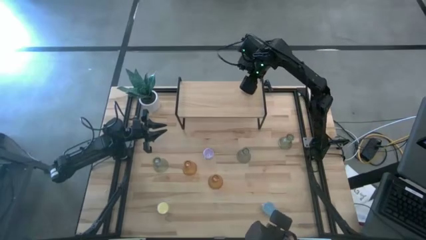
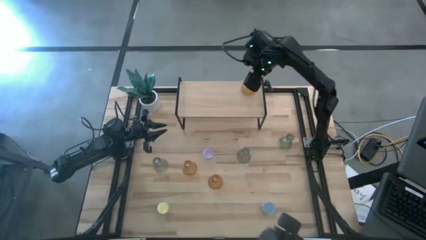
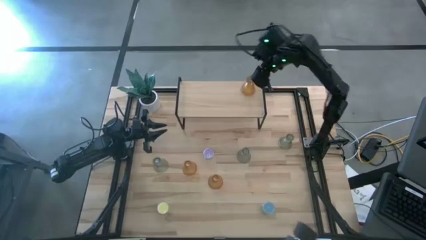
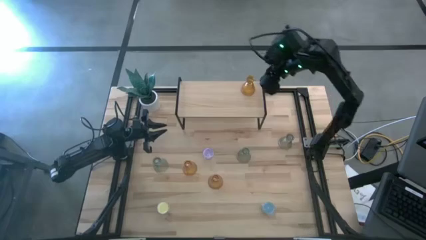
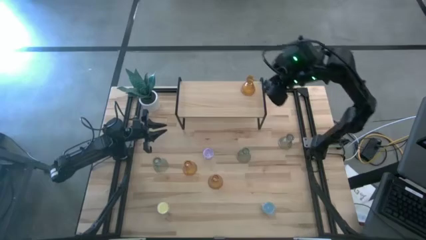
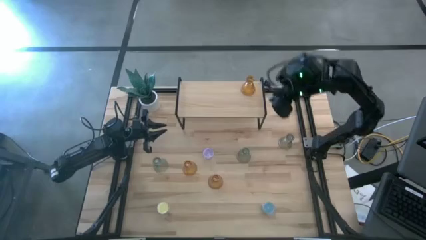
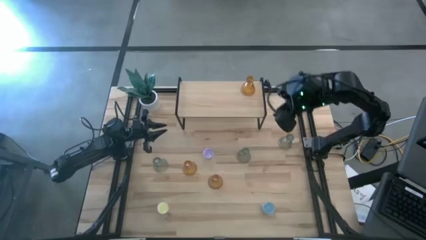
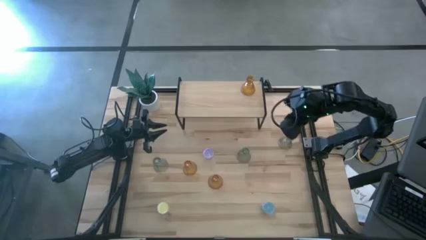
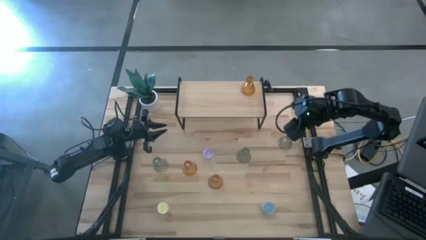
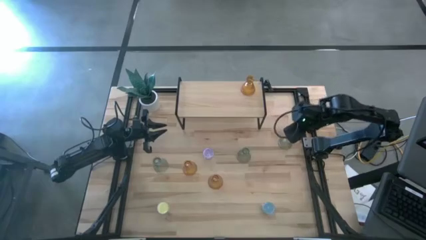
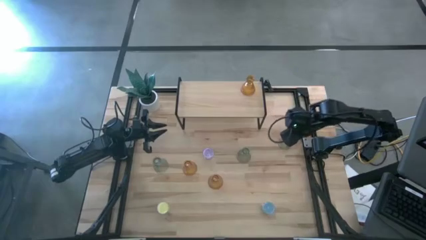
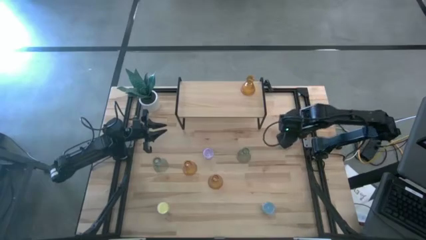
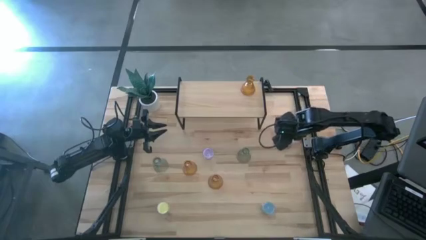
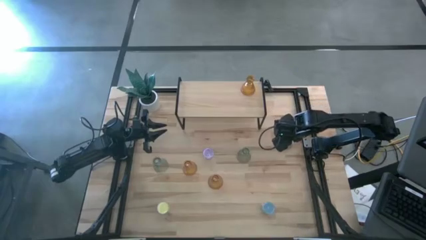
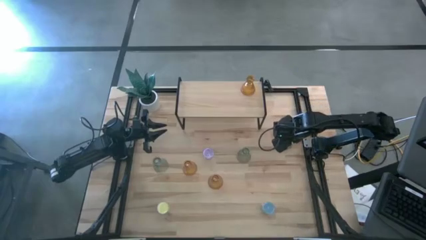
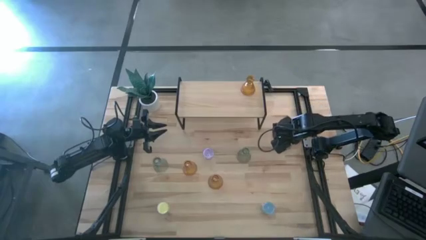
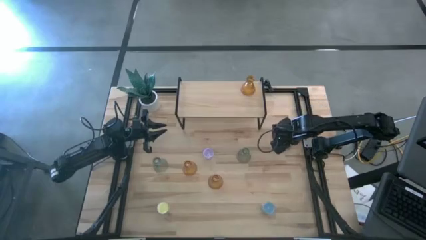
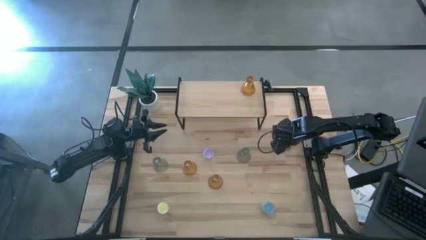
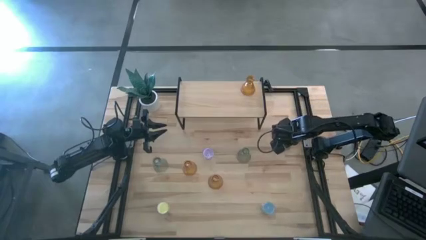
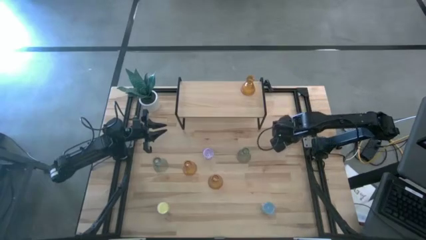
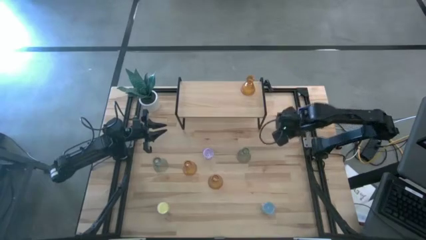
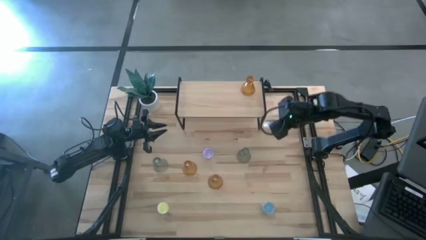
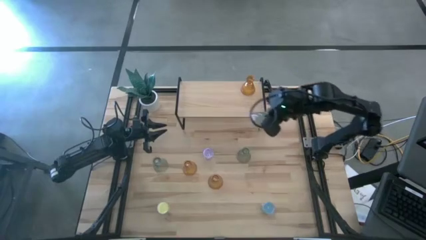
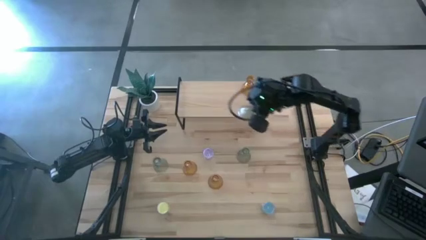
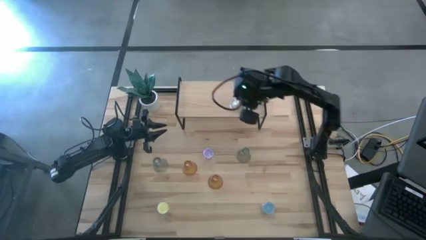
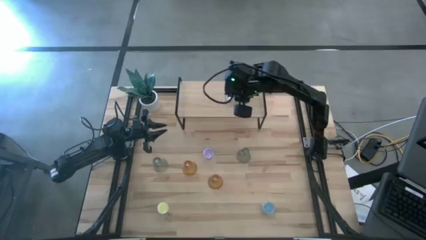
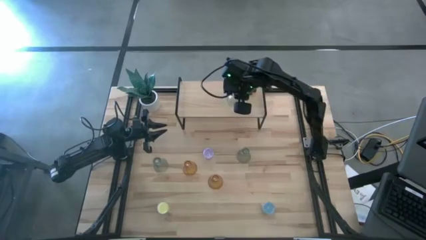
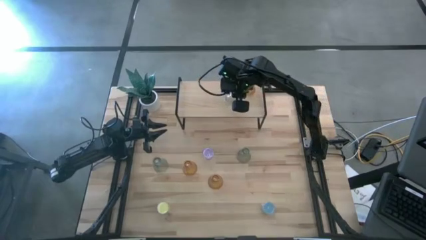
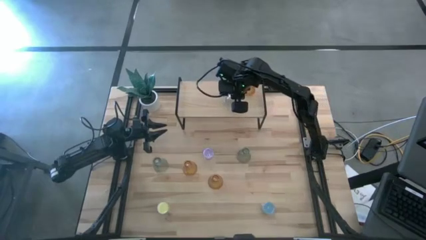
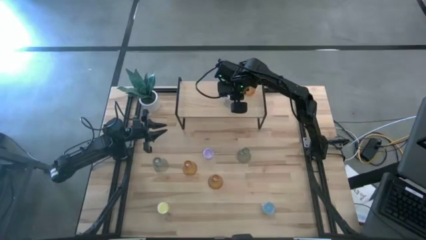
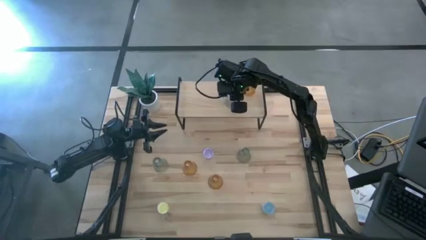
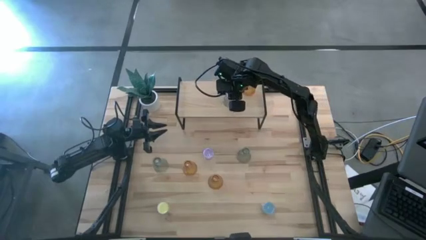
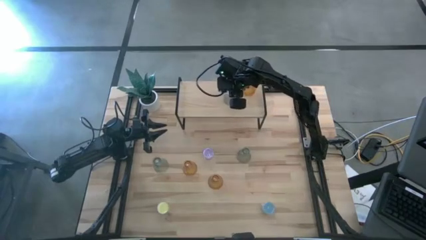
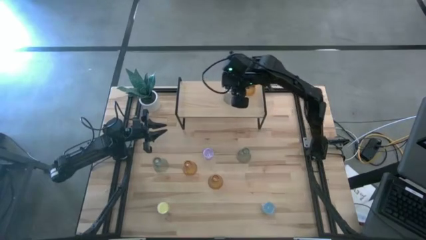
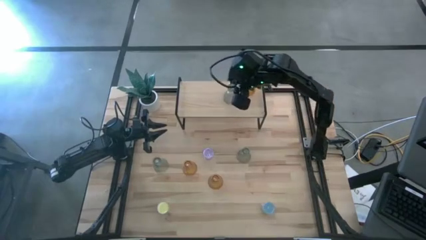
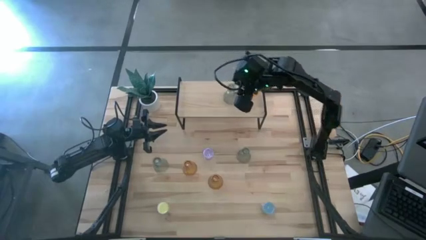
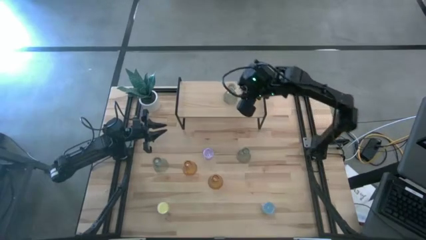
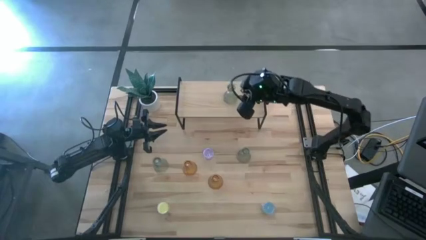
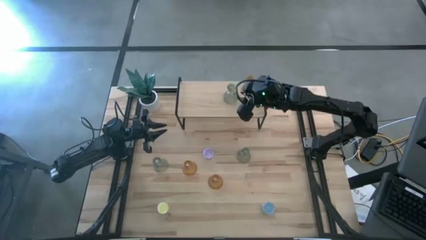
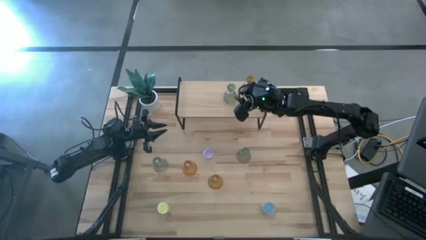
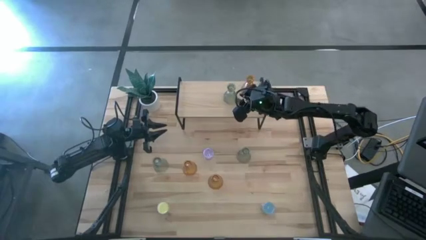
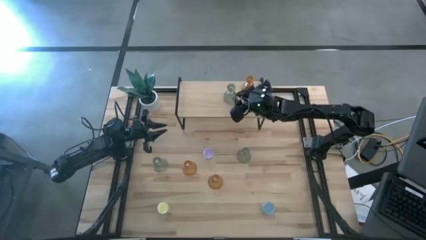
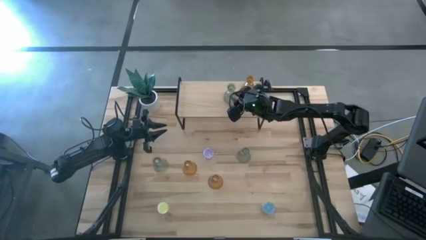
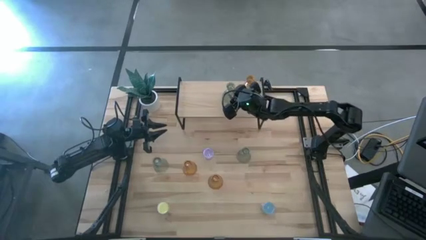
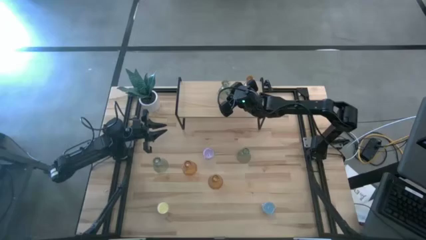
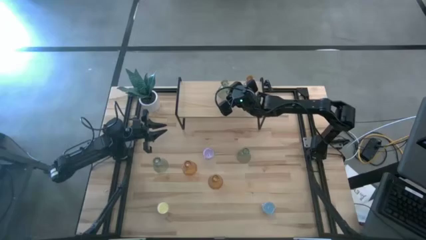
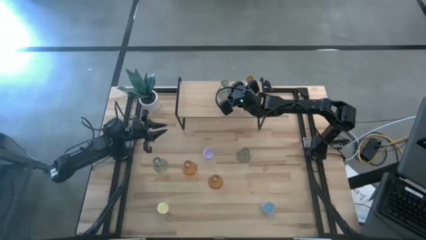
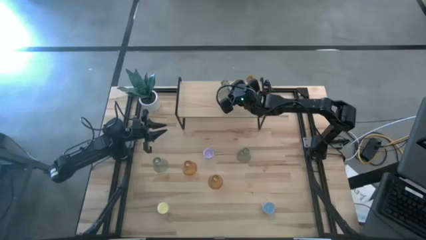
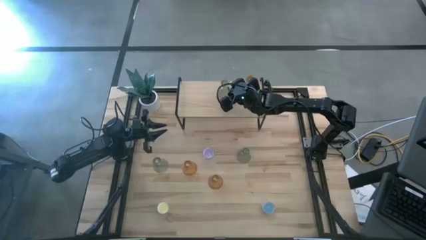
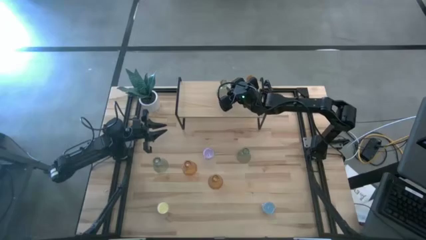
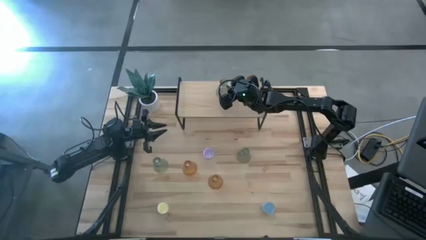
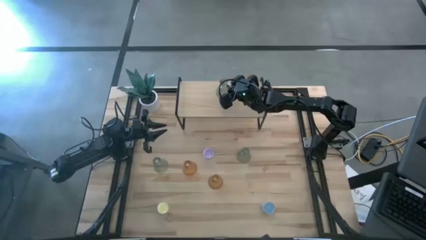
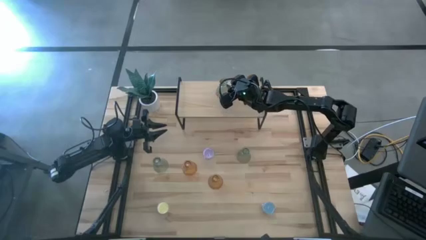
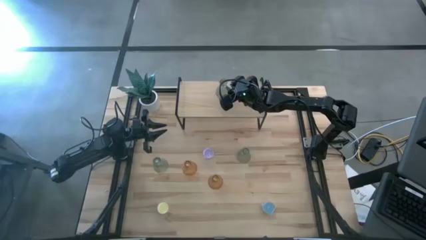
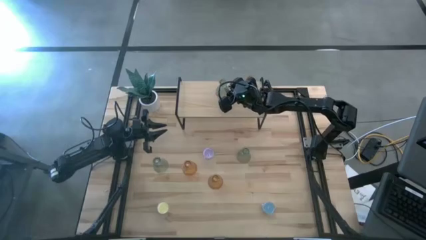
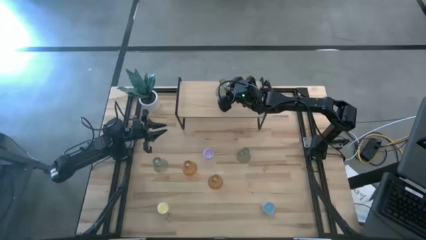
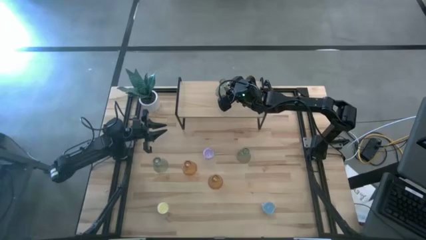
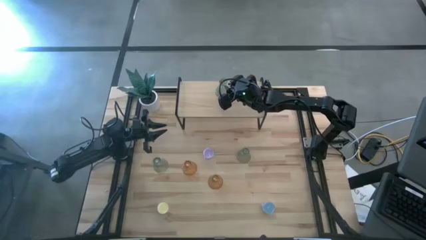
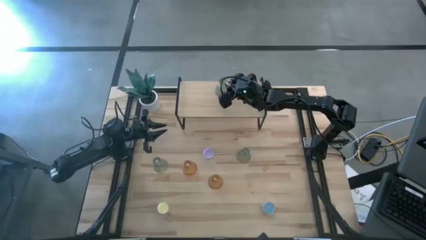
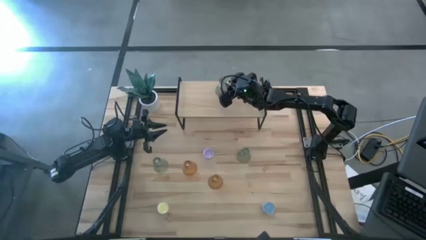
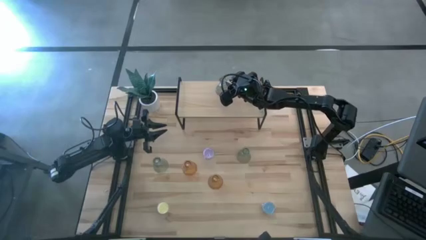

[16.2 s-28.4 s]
Task: Pick & Place candle stick holders
Put the top green glass candle holder on the shelf
